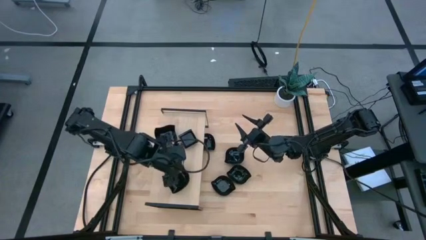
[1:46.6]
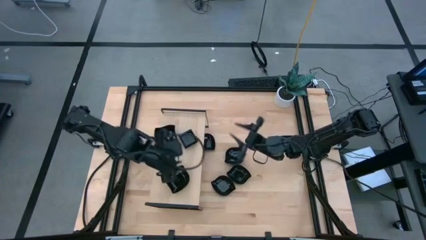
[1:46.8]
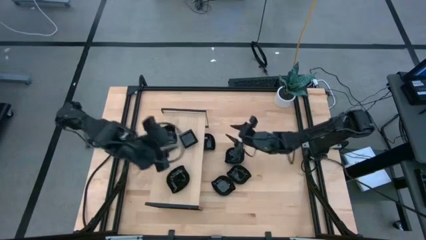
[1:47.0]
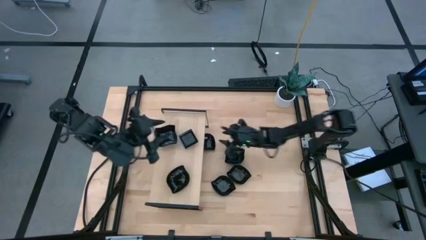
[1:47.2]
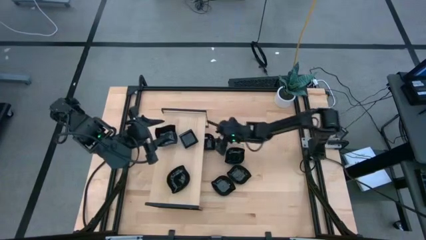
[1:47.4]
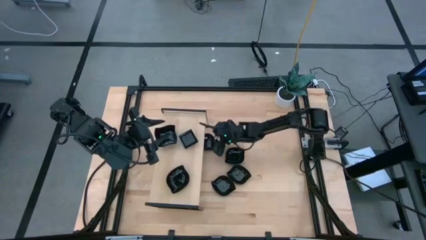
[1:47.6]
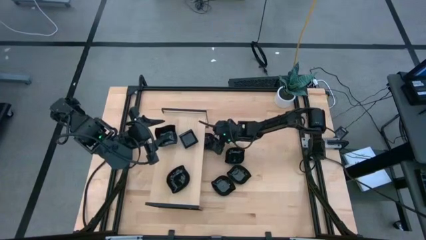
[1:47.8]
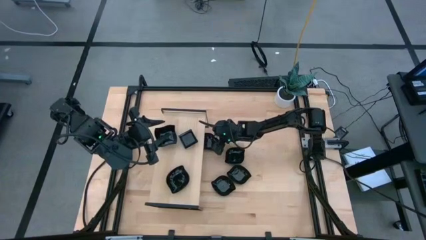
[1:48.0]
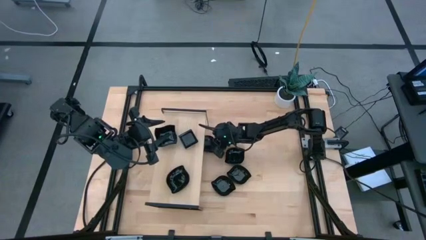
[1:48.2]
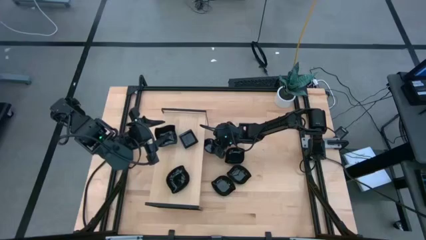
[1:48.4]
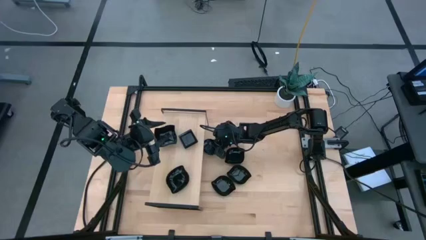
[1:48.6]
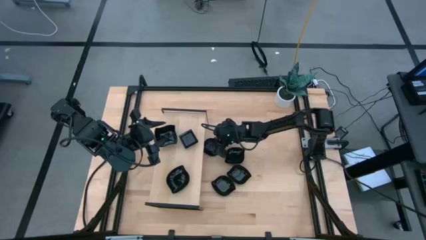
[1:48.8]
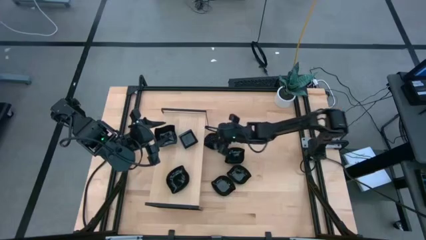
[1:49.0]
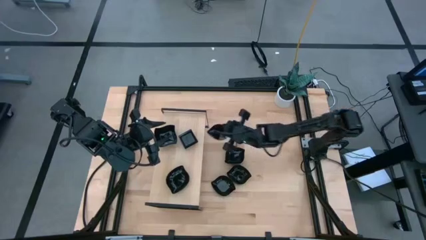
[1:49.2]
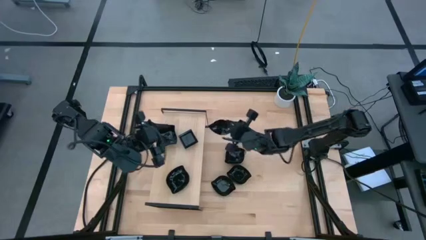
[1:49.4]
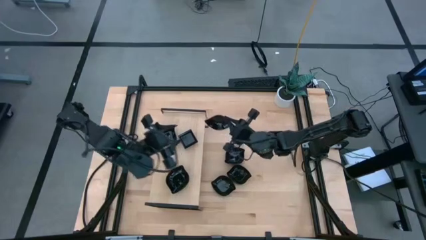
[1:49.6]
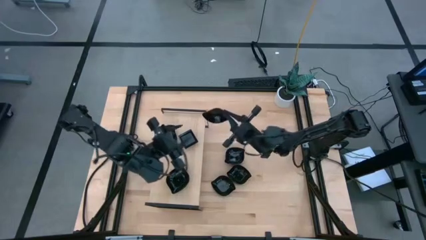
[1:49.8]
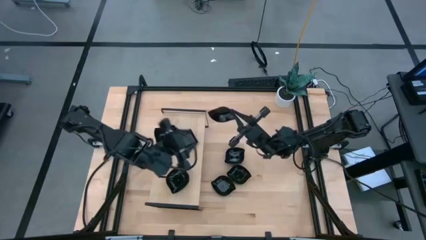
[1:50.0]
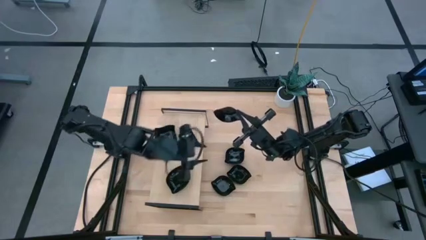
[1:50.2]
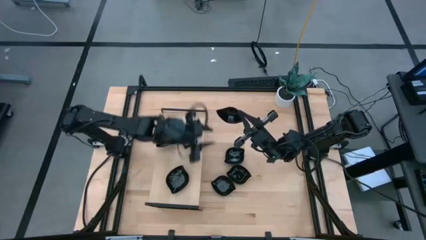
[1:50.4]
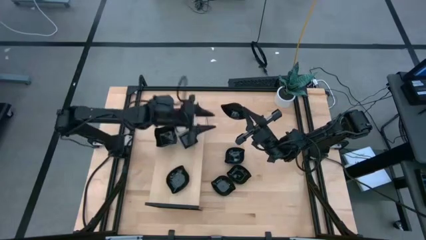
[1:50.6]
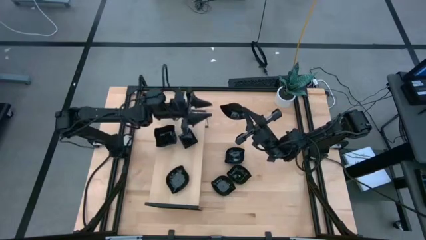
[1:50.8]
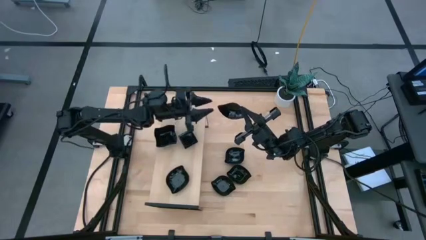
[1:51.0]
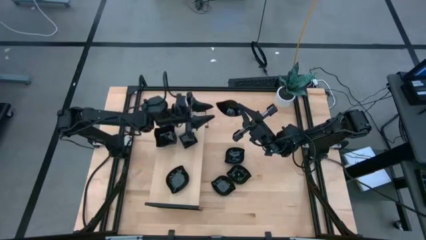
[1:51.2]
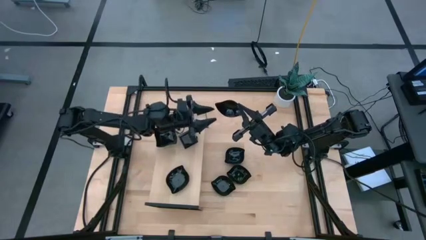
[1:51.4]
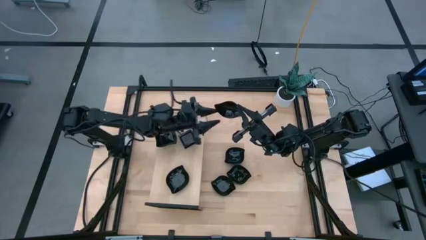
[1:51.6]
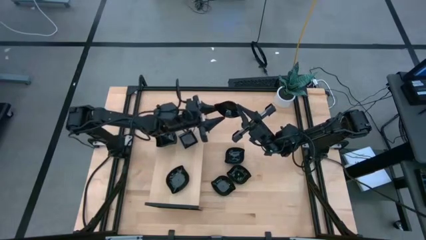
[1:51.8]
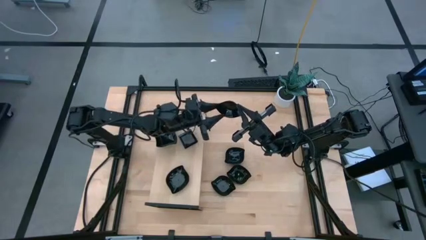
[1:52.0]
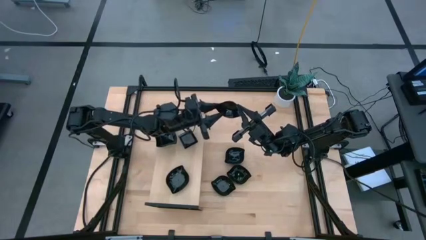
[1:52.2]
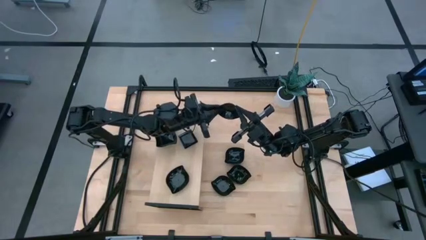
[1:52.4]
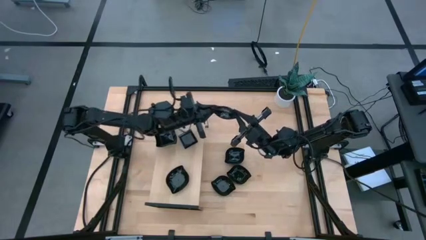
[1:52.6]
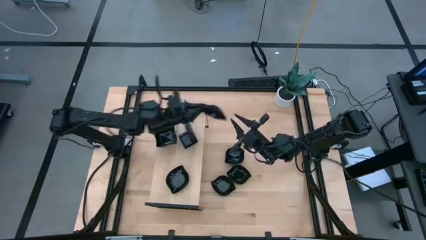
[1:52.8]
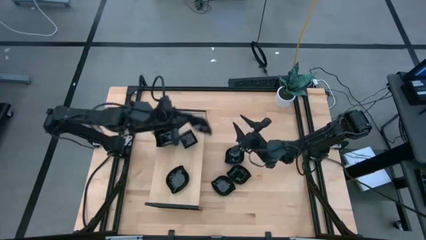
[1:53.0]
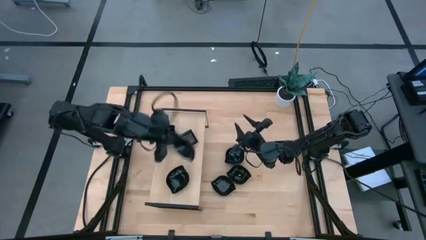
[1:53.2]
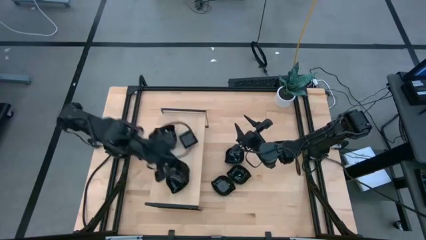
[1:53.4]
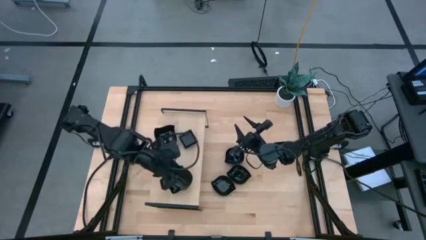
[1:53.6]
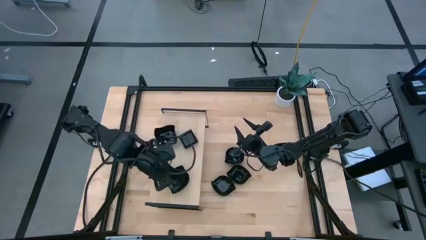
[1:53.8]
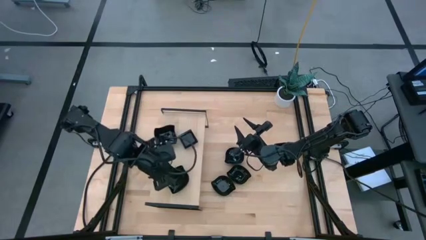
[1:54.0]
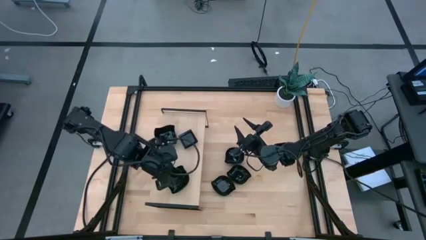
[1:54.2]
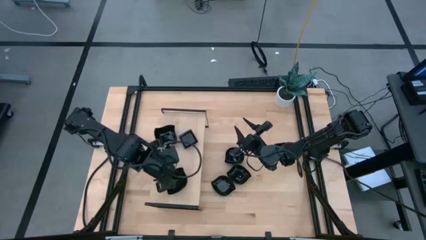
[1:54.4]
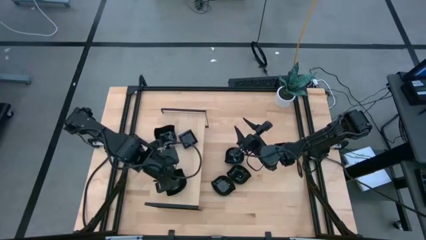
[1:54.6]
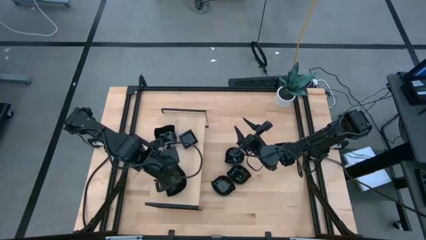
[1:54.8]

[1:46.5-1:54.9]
Task: Pick & Place Mini shaped plates
Stack the leaf shaped plate on top of the leaf shaped plate on the shelf

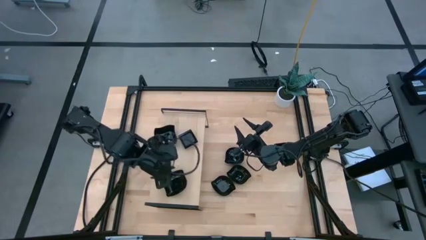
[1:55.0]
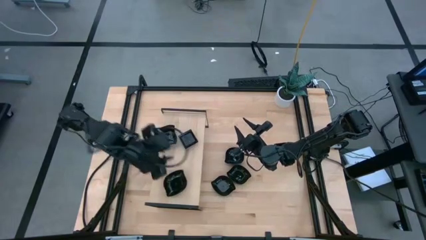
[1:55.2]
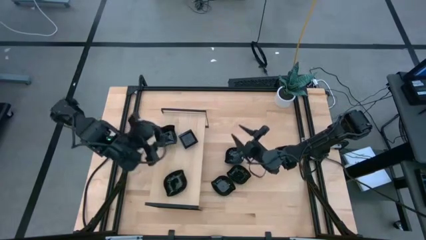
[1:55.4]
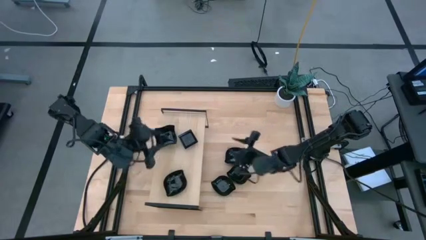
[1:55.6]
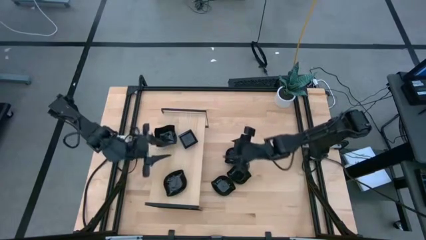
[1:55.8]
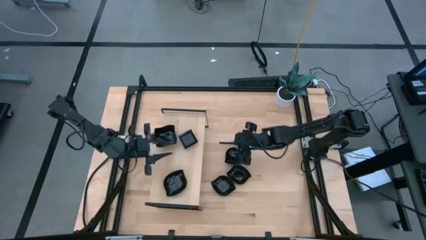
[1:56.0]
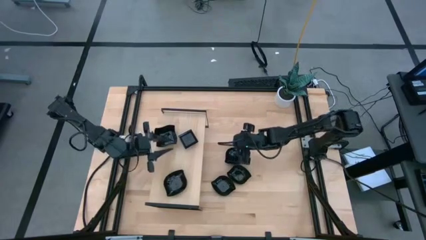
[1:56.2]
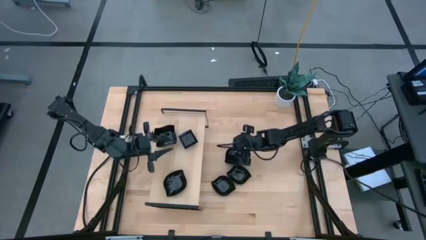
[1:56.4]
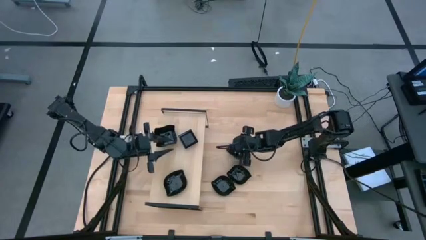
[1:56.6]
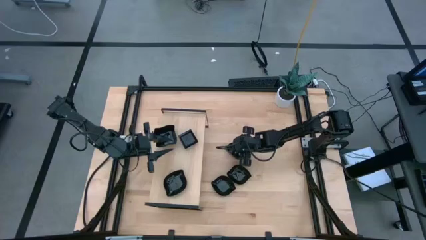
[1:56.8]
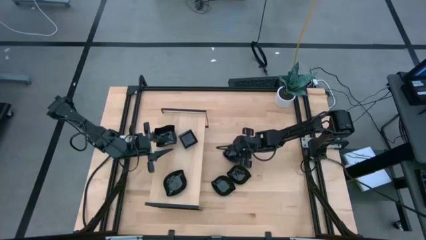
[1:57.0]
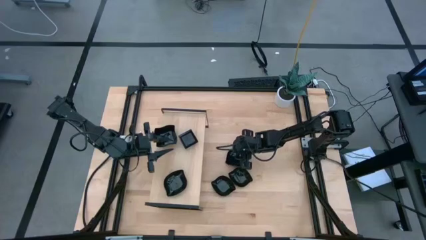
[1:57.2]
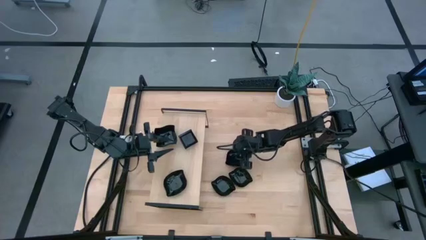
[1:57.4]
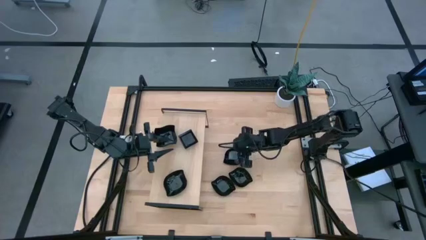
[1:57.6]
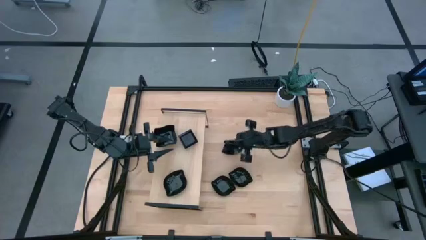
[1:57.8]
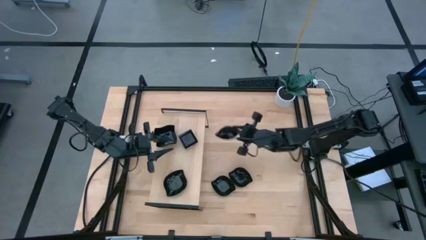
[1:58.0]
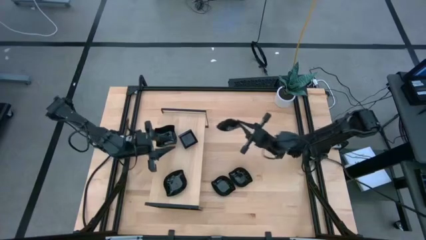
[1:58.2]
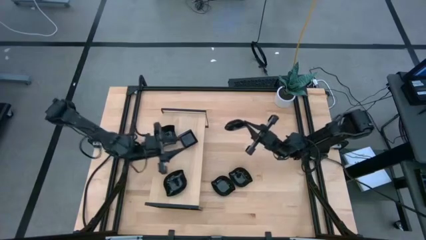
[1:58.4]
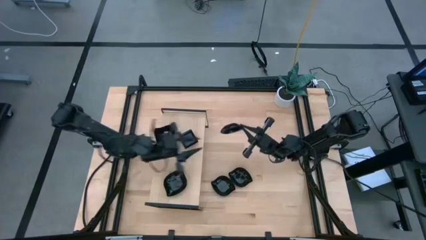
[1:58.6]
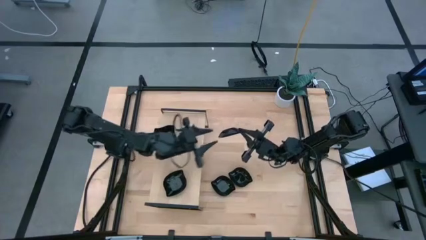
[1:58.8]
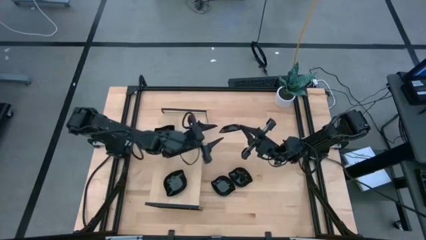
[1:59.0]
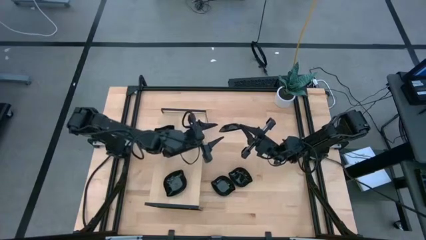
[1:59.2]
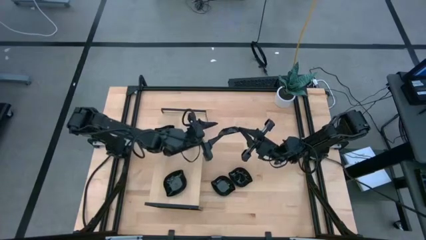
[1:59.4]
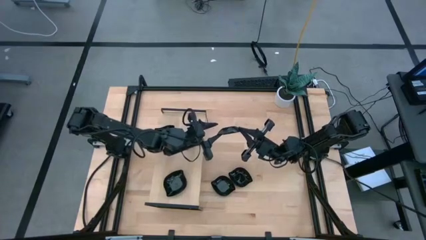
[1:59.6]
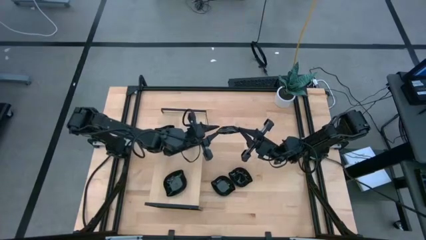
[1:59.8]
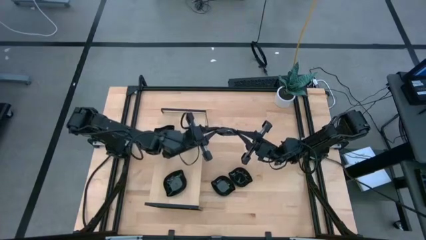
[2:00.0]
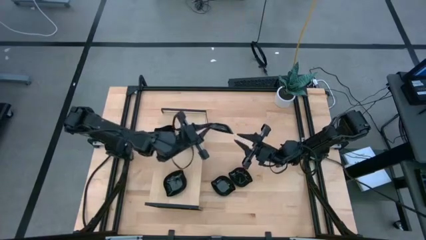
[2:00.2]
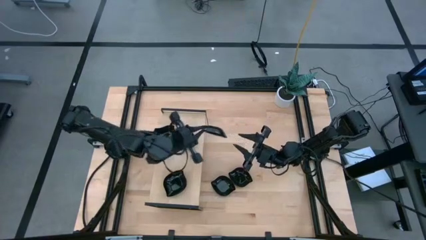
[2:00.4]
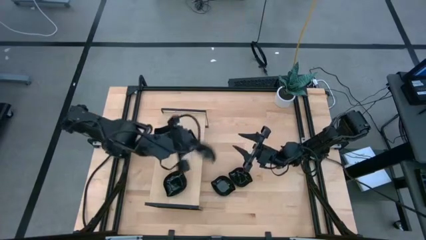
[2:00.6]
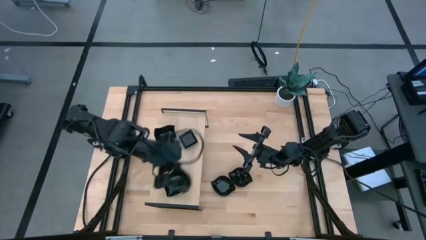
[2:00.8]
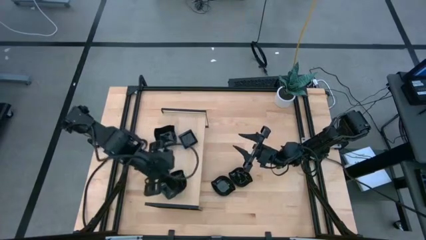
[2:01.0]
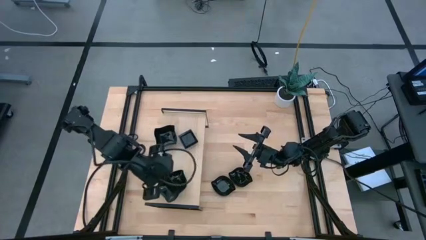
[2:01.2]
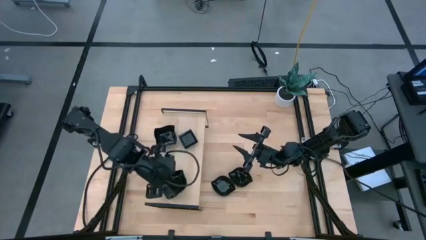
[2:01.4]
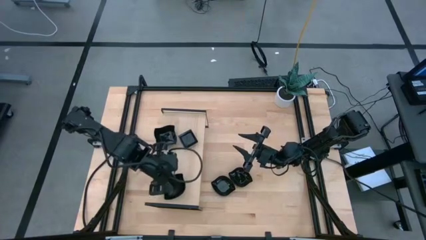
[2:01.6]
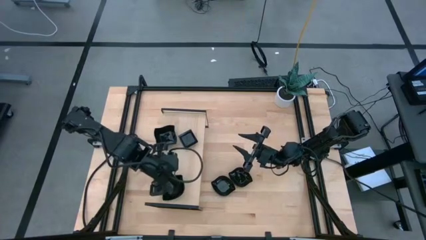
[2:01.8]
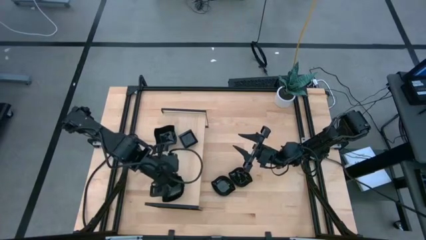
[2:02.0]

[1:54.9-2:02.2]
Stack the leaf shaped plate on top of the leaf shaped plate on the shelf
